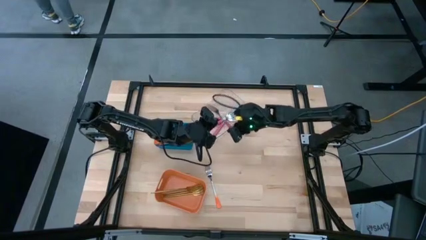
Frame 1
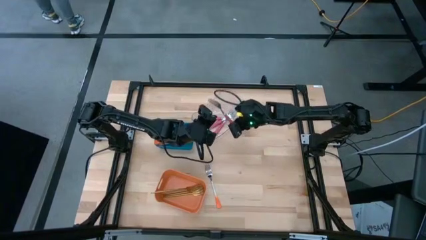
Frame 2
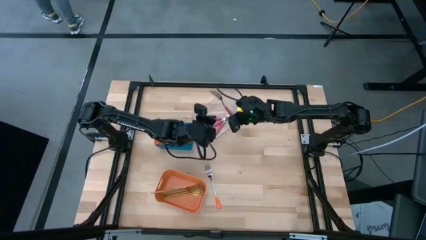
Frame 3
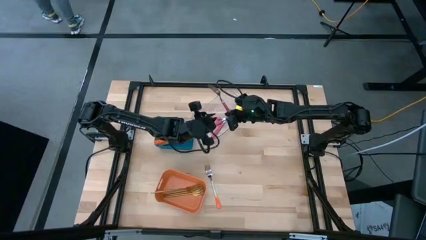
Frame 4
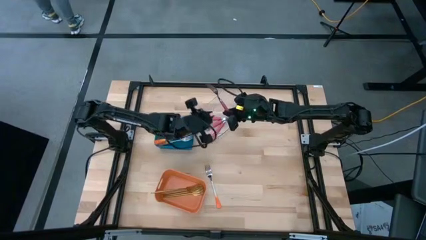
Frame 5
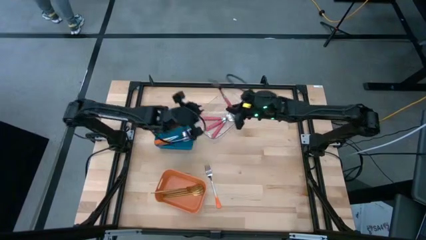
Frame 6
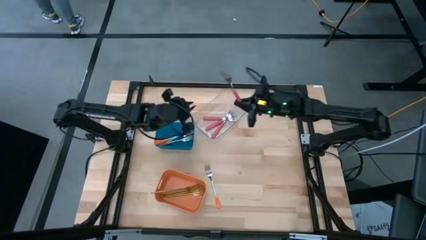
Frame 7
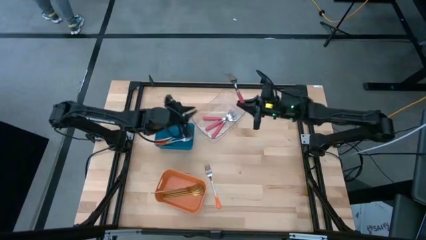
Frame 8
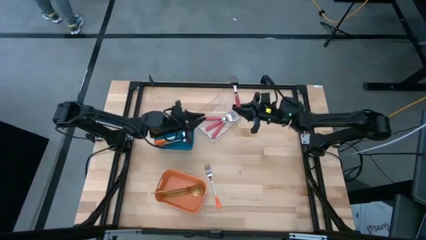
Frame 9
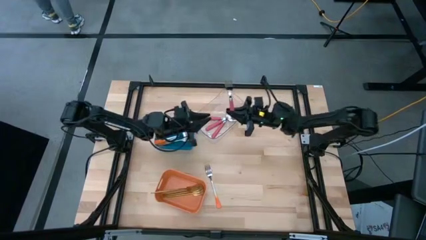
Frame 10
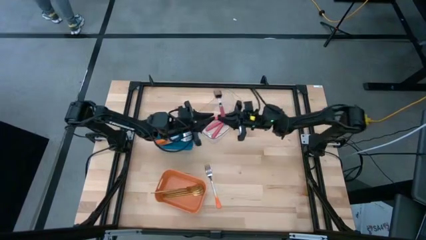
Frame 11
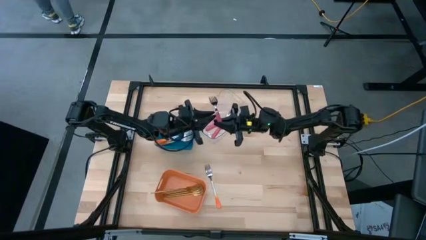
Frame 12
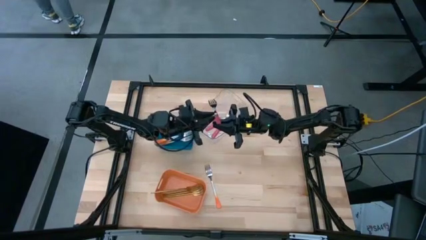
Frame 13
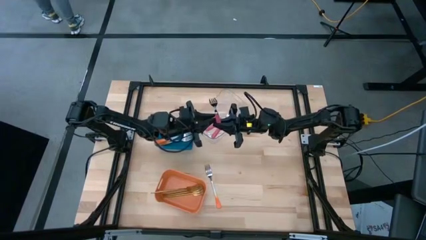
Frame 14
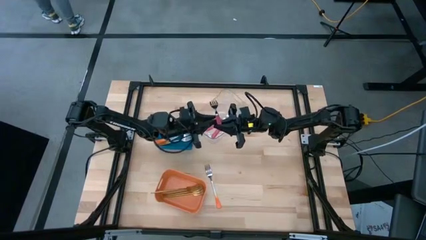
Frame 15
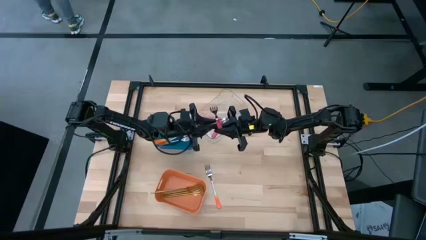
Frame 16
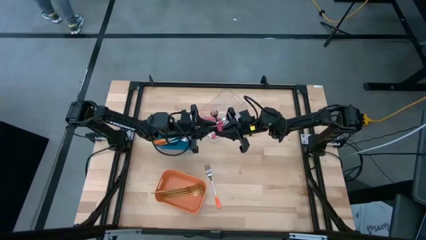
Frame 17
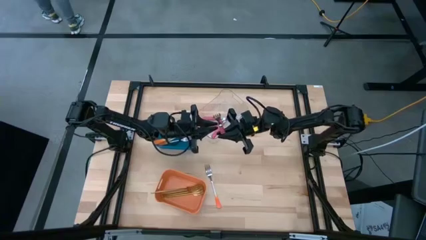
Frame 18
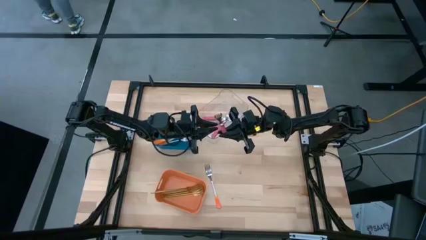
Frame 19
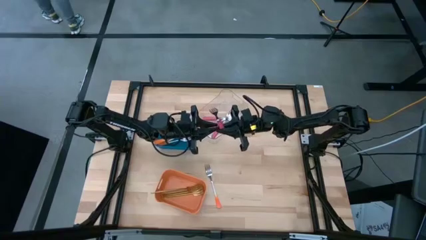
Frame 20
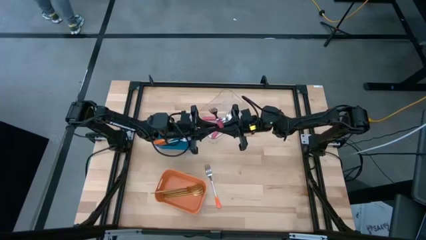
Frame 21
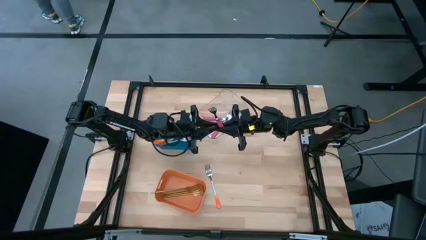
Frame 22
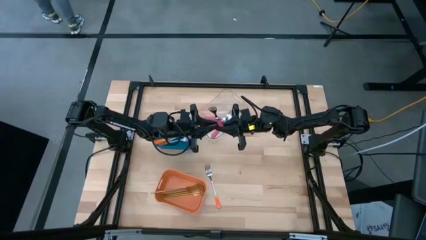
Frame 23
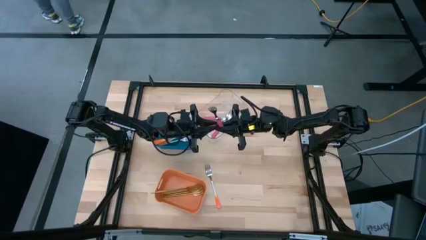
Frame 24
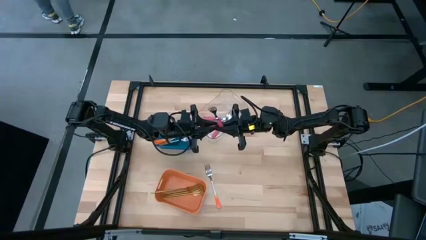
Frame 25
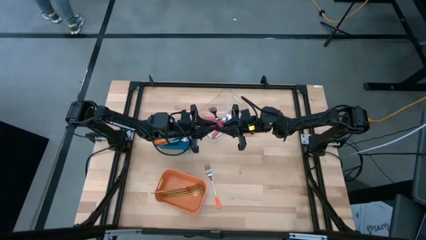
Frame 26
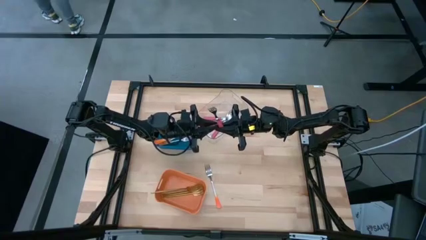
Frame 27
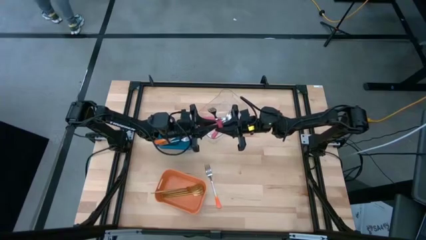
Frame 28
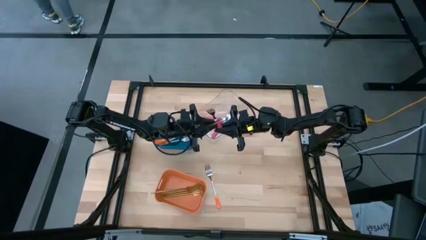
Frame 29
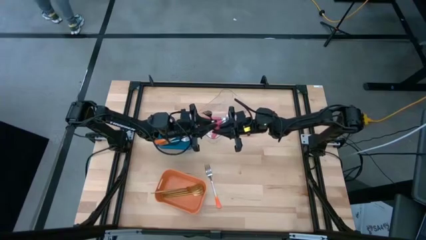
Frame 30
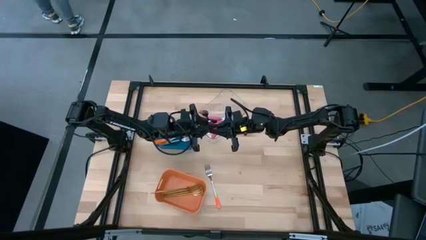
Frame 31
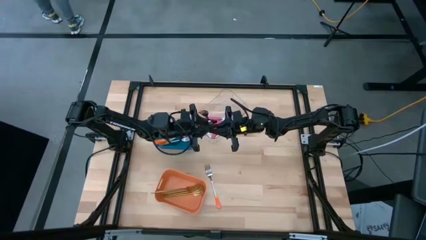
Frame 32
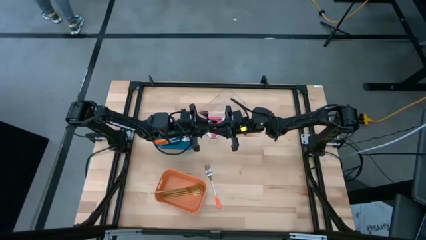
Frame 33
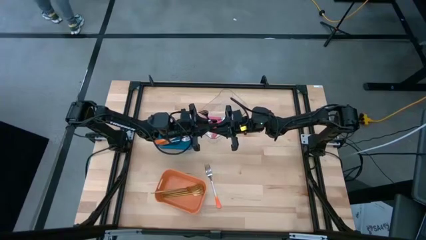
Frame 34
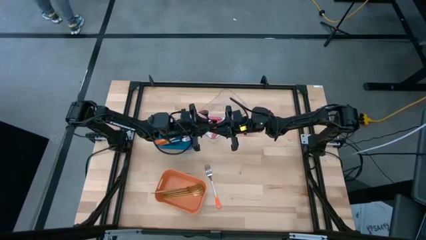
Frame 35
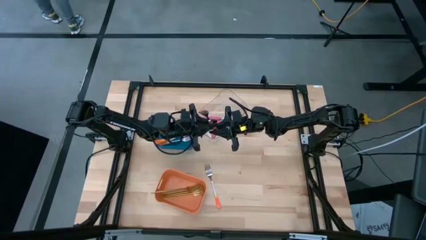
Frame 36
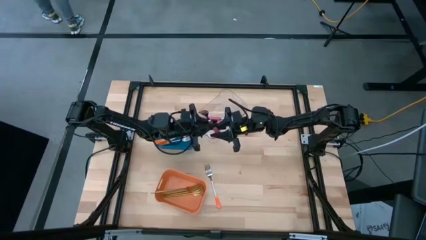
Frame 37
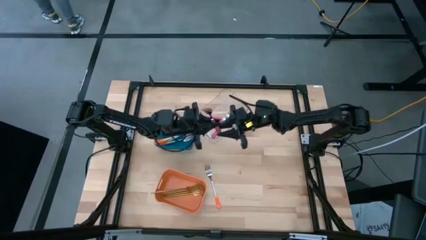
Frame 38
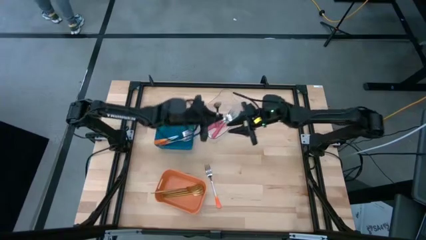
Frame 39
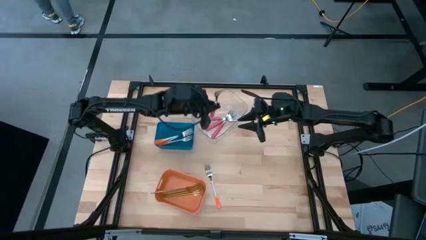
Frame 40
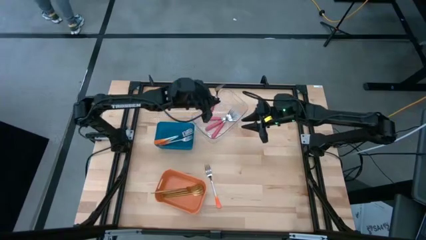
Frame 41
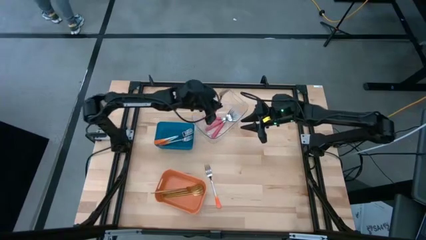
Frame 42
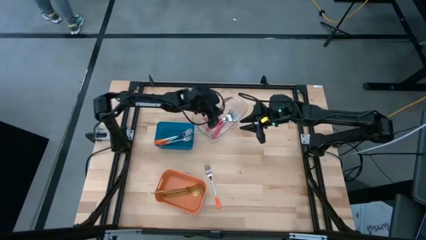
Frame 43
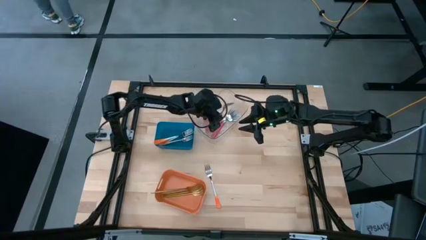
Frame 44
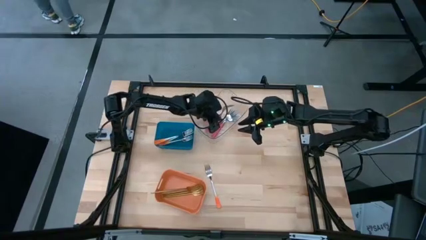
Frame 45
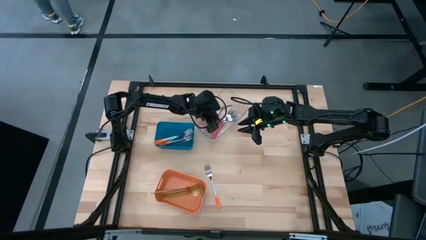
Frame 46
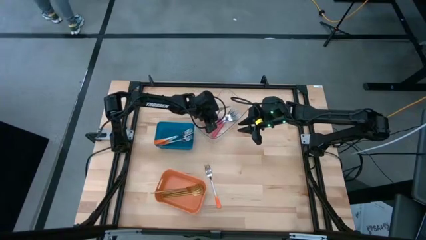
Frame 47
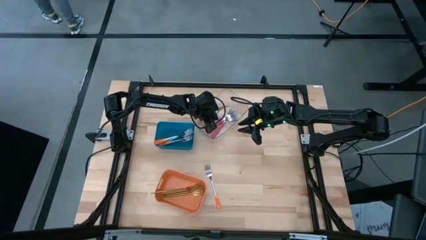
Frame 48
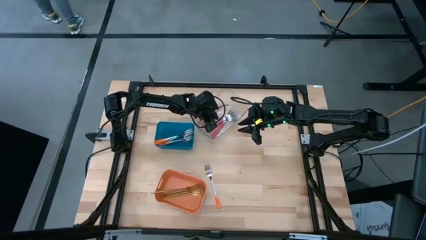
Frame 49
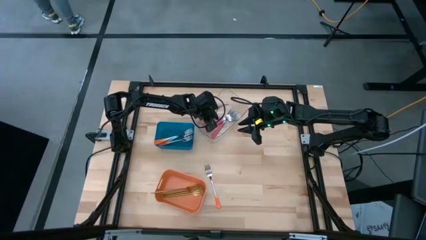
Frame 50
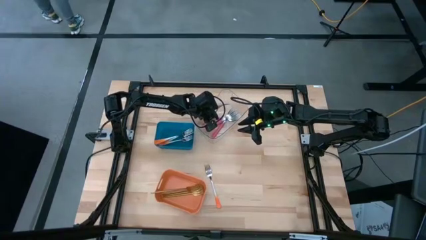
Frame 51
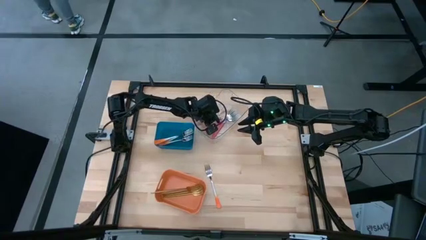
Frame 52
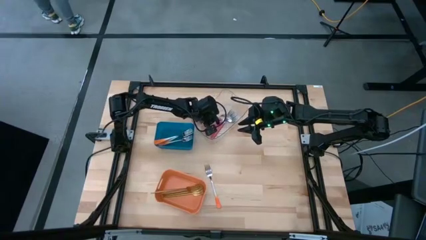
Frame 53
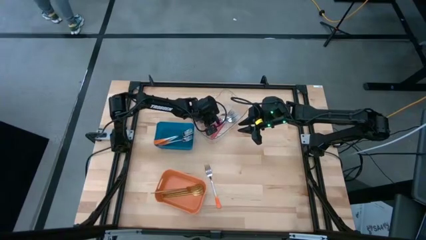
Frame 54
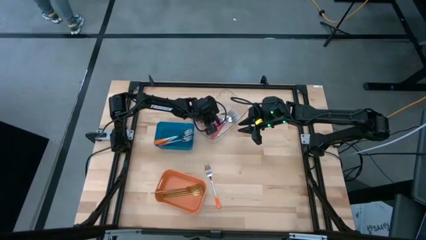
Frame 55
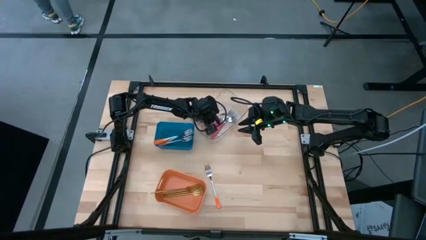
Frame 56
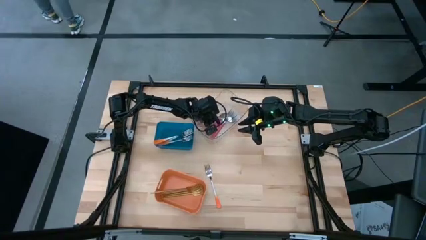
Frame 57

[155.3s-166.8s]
Task: Sort silverware by color (type)
Put the pink fork into the transparent bin

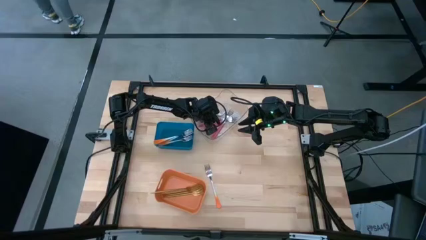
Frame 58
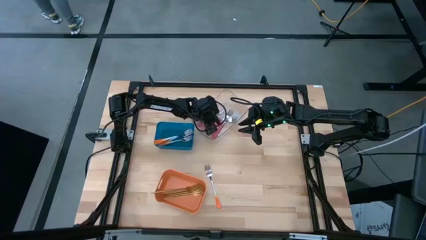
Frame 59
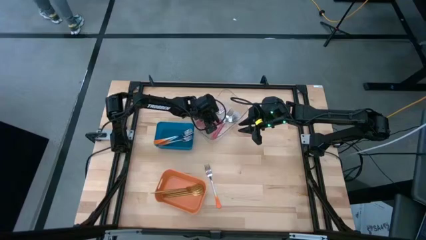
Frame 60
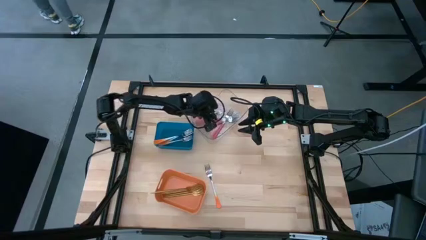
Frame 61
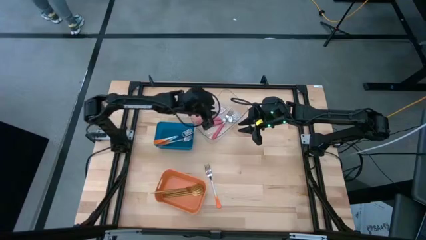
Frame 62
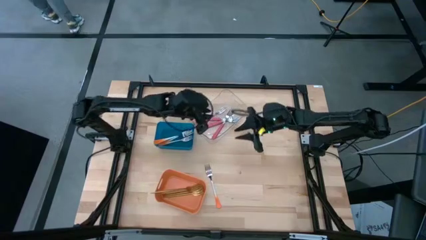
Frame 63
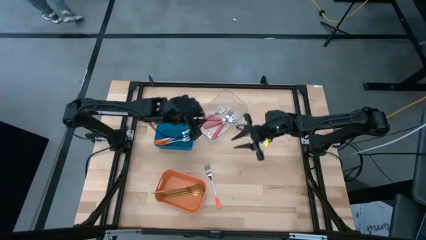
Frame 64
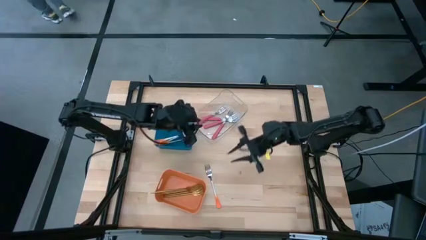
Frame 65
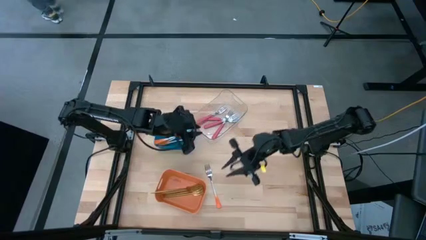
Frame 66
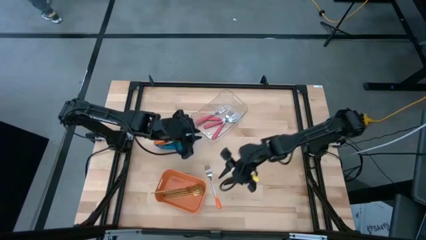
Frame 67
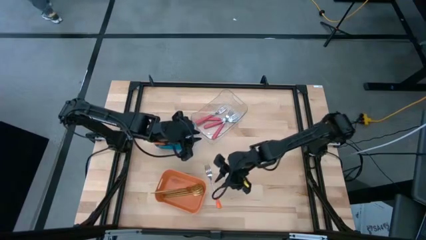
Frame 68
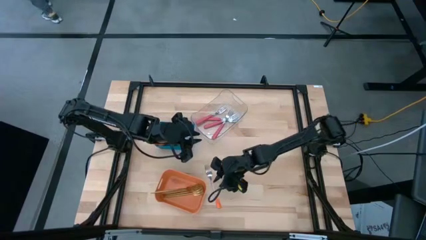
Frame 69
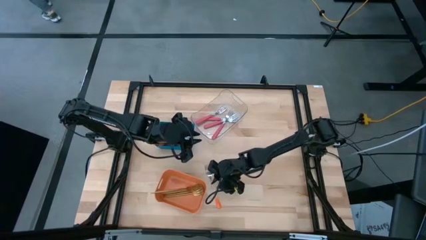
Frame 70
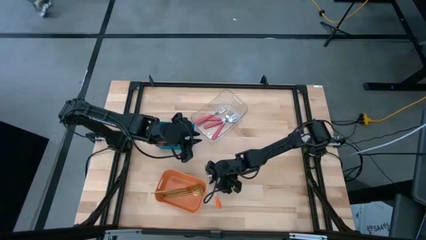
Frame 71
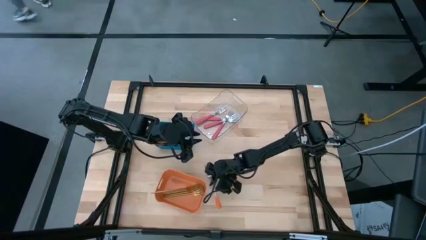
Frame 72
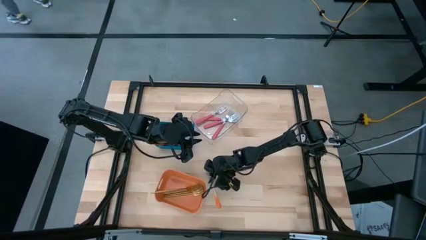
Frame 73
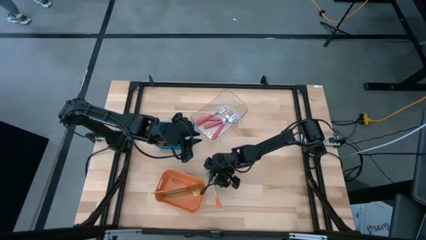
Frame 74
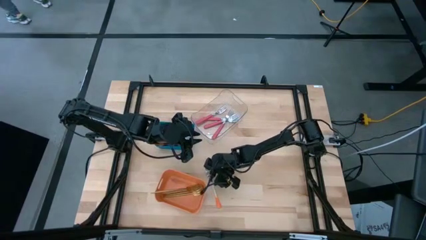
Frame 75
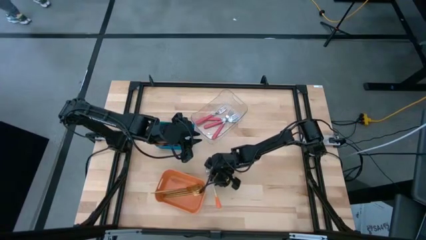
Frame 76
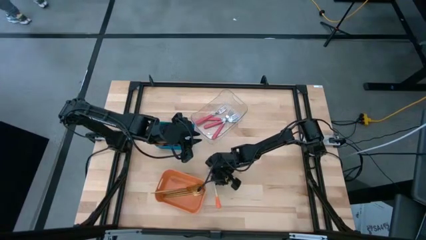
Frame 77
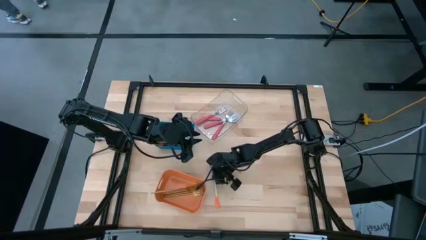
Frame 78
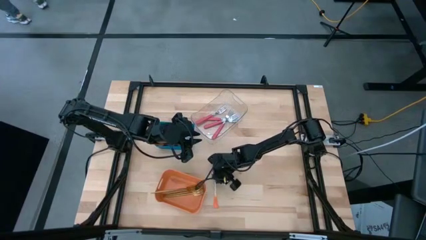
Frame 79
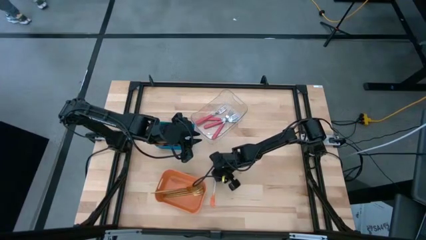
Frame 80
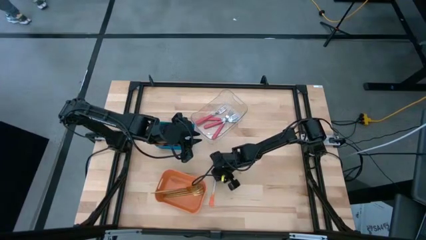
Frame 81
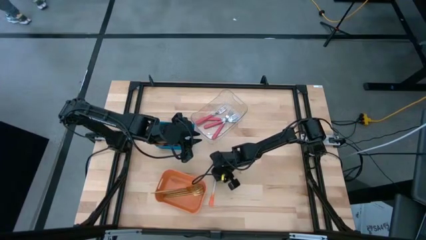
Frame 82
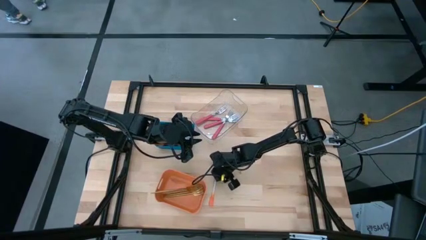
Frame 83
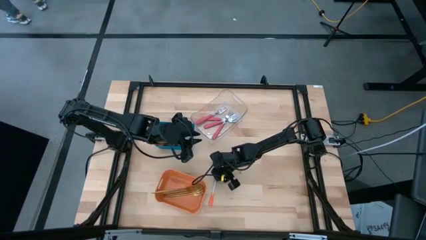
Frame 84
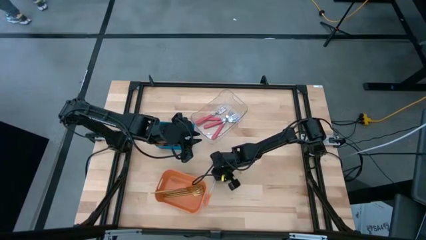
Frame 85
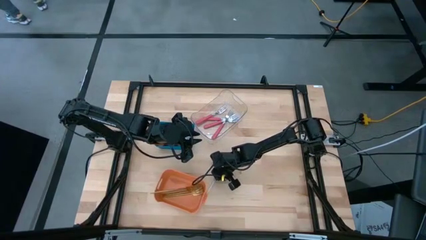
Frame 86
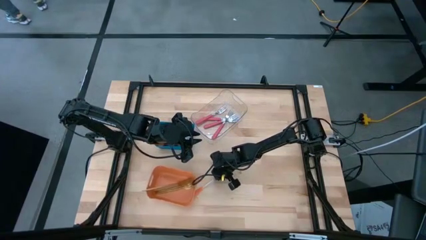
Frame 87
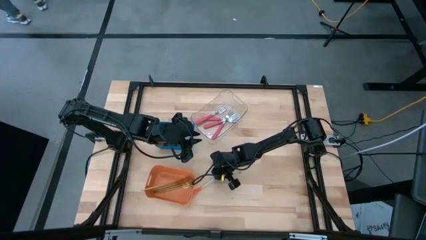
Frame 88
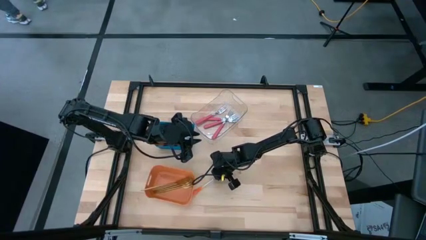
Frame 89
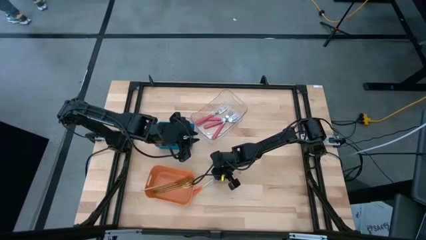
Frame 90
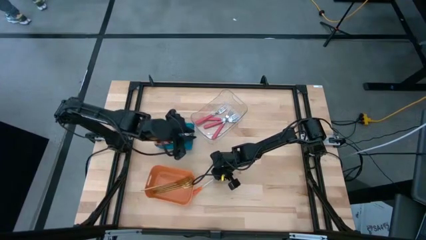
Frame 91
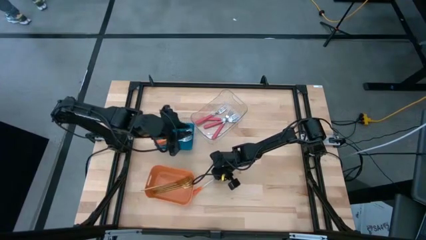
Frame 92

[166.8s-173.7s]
Put the orange fork into the blue bin
